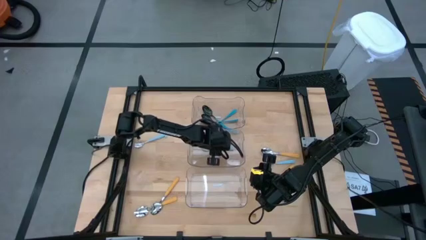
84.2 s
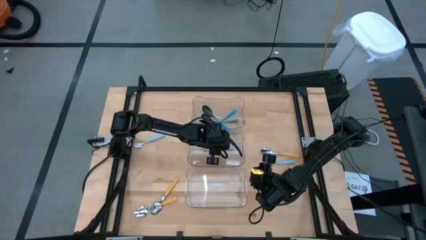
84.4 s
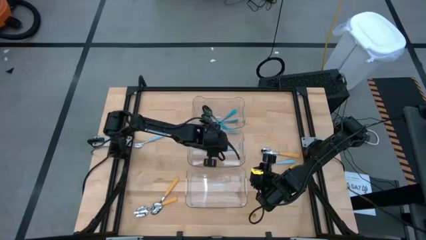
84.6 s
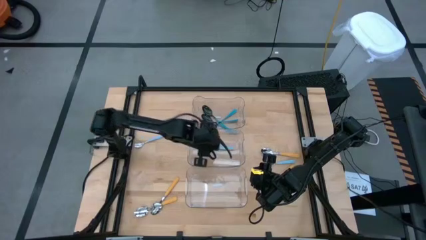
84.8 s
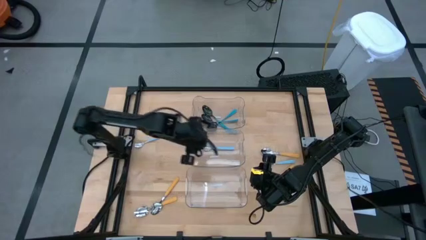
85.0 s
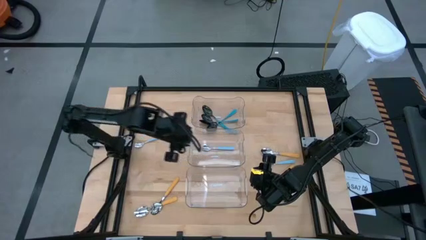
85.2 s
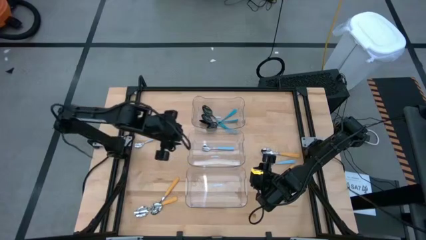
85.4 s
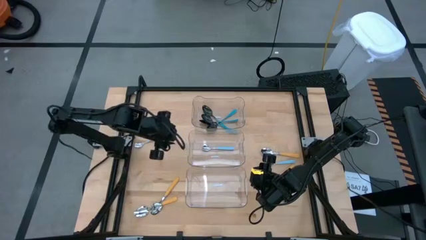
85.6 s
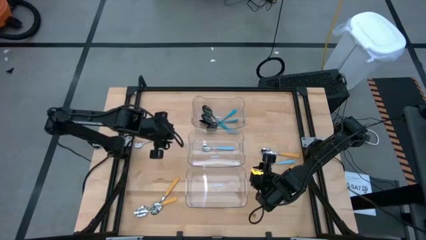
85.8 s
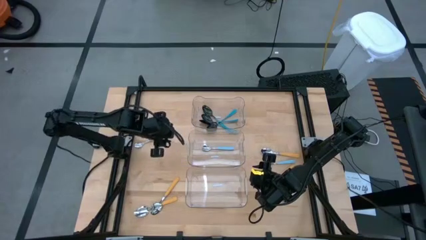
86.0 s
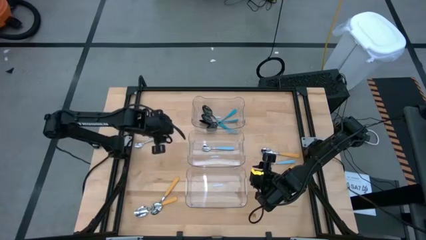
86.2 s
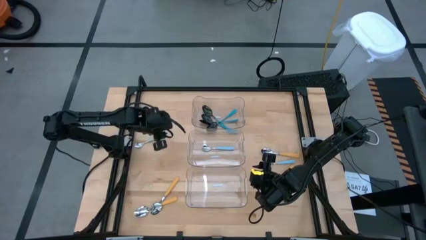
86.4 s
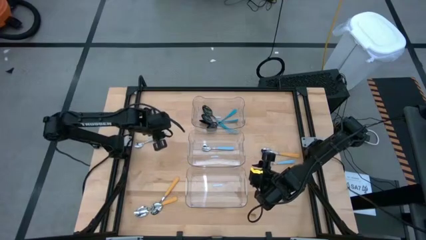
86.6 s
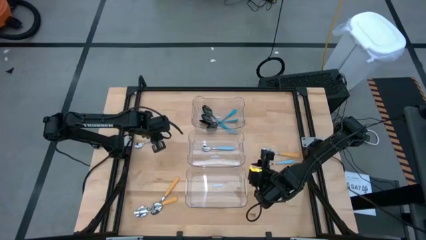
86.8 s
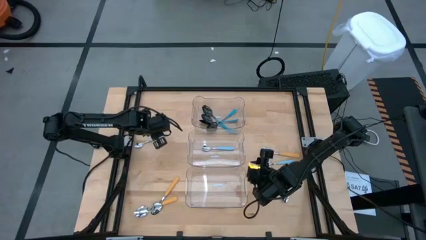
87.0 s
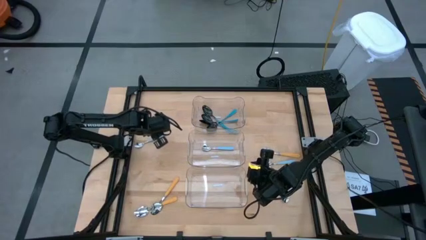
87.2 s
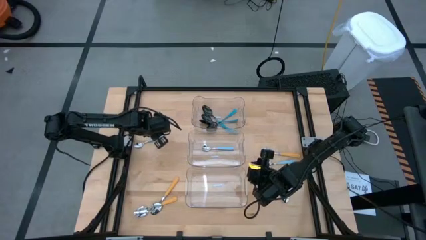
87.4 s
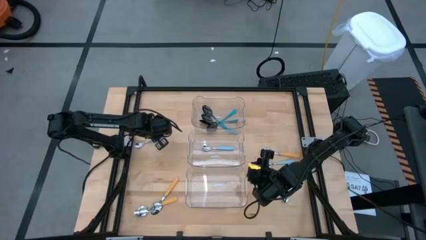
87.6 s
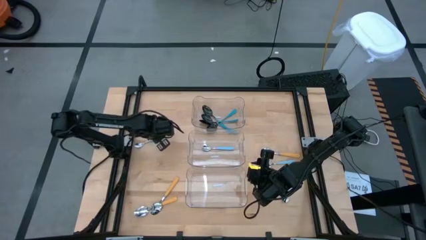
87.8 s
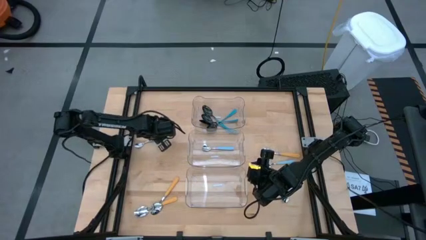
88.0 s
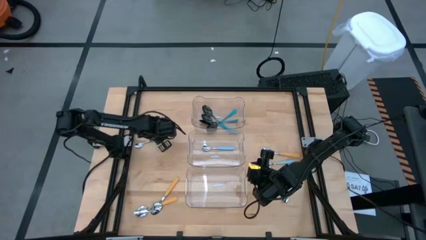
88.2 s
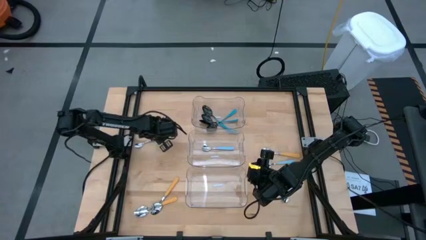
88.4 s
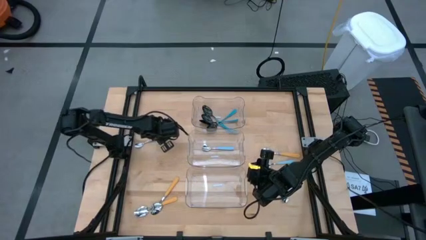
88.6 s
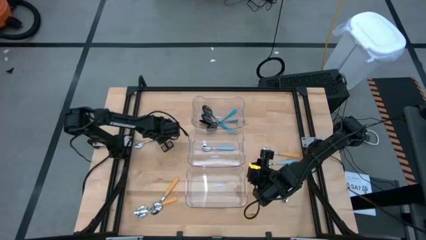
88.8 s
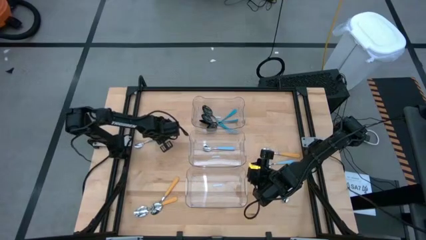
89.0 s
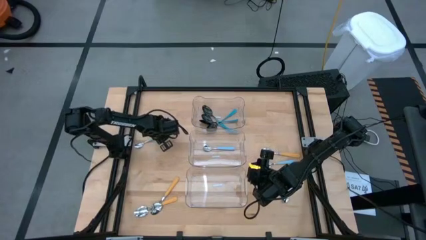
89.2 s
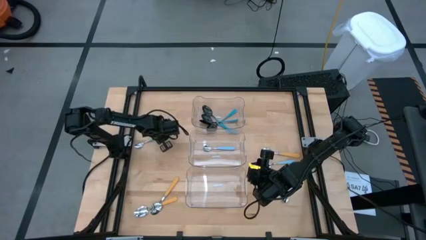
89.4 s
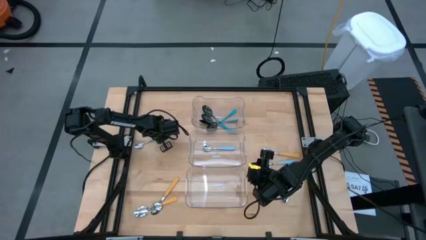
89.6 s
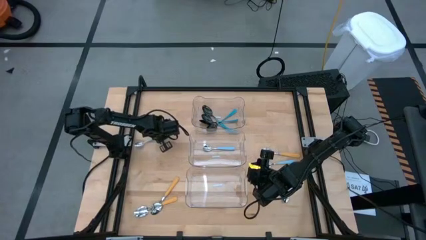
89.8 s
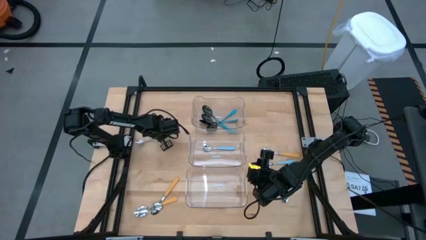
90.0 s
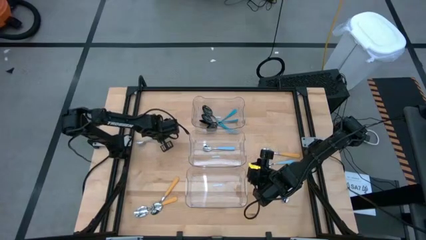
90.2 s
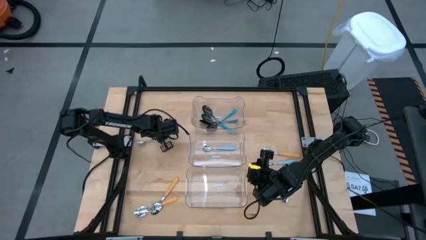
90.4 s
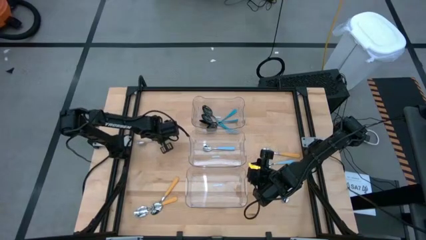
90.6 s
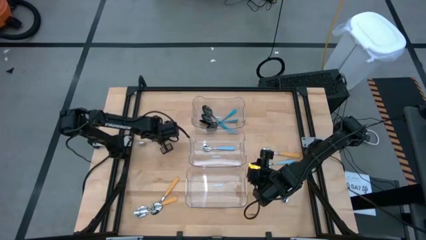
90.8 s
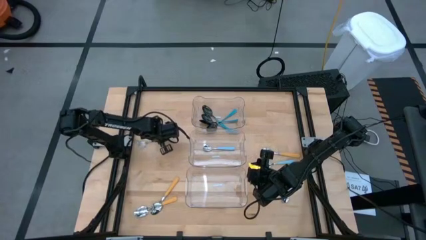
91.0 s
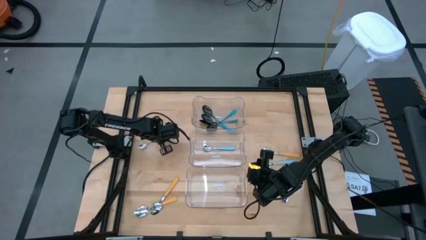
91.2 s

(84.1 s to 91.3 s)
Task: Sort silverware by color (type)
Put the light blue spoon into the middle transparent bin

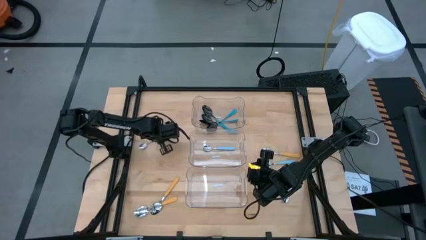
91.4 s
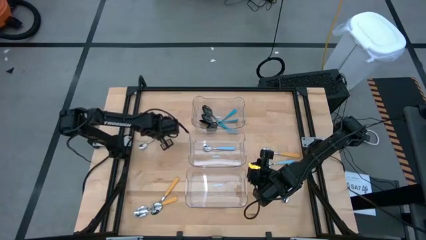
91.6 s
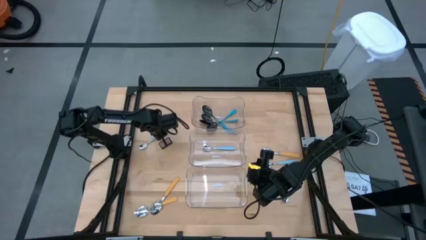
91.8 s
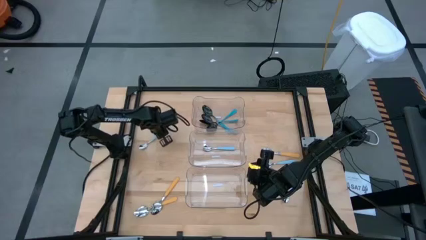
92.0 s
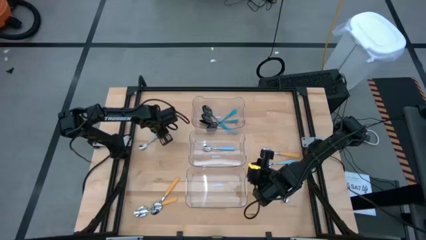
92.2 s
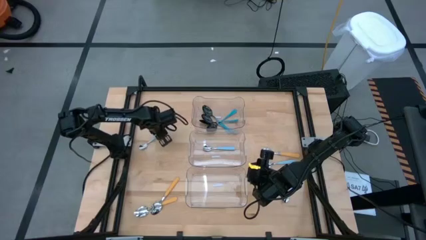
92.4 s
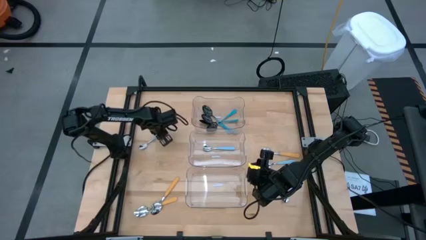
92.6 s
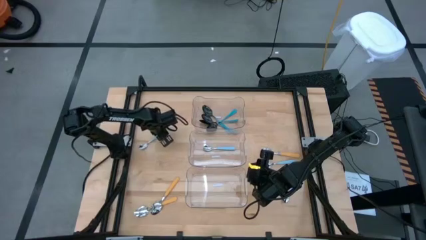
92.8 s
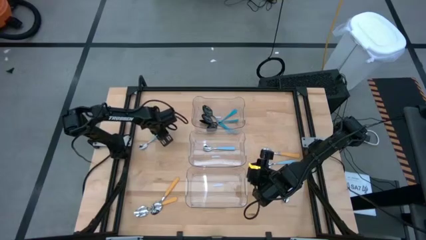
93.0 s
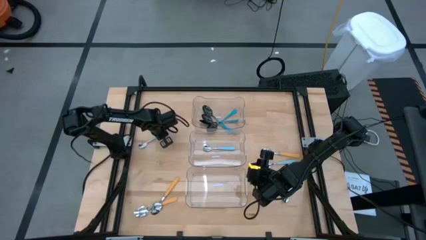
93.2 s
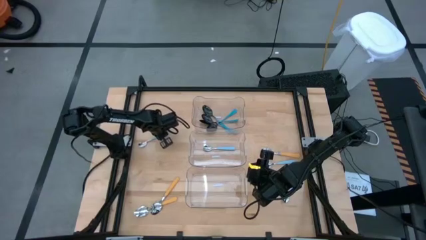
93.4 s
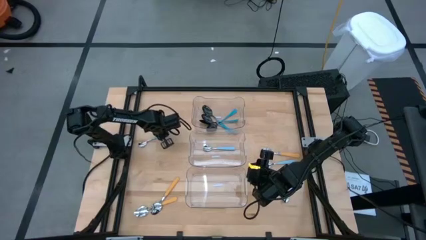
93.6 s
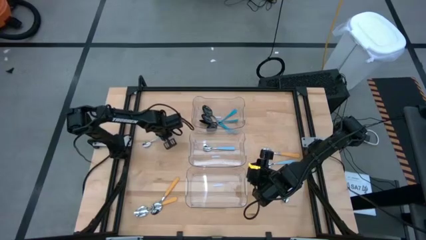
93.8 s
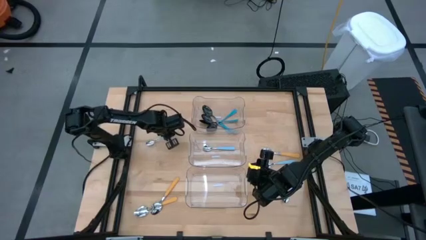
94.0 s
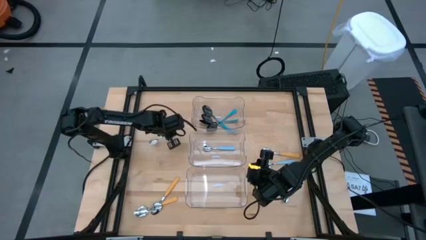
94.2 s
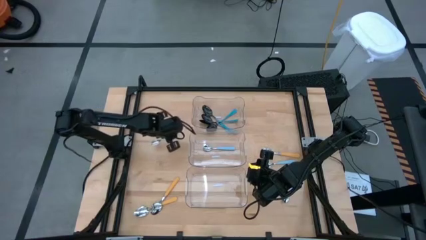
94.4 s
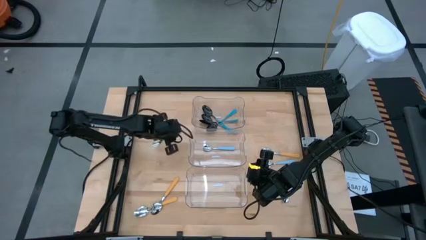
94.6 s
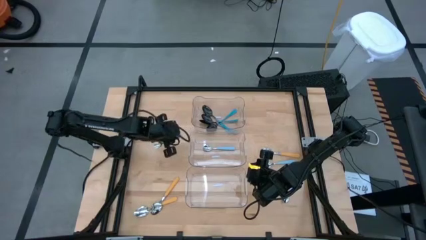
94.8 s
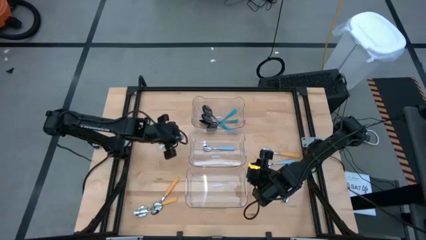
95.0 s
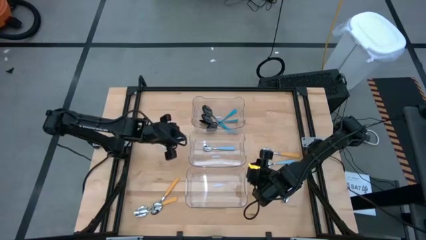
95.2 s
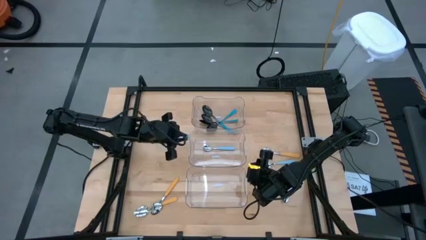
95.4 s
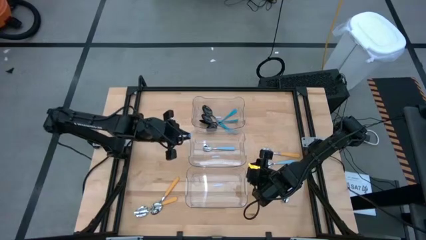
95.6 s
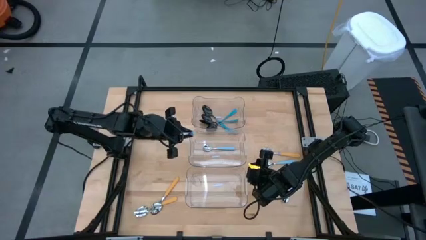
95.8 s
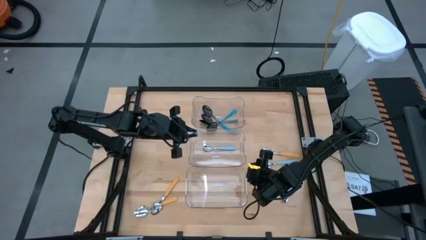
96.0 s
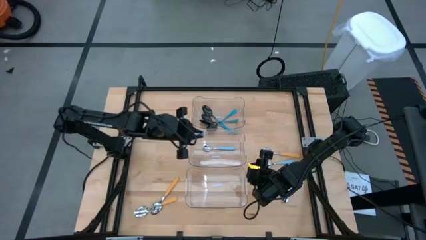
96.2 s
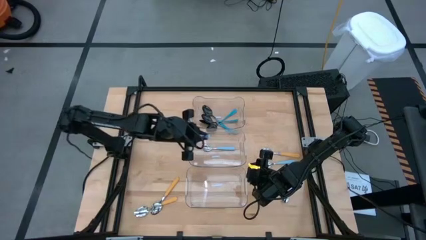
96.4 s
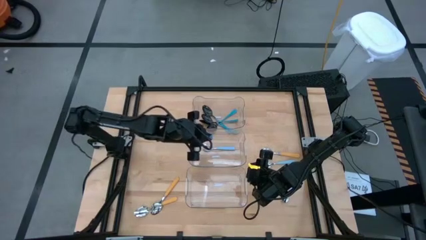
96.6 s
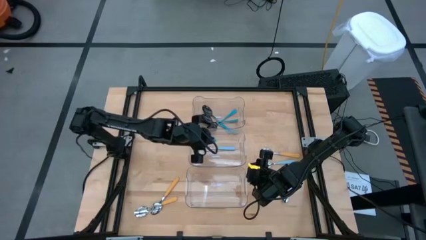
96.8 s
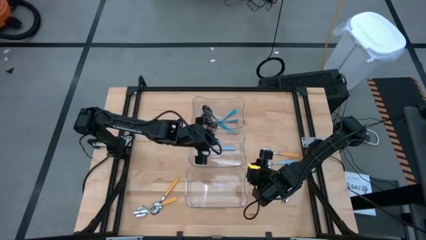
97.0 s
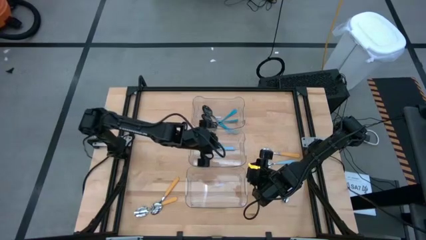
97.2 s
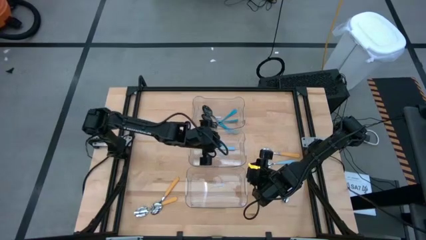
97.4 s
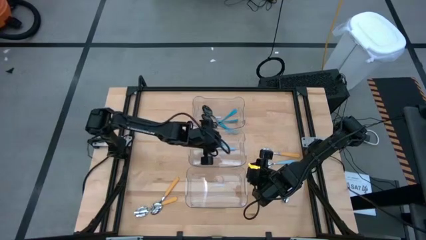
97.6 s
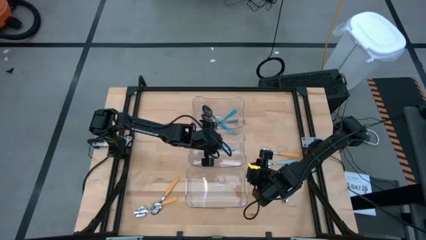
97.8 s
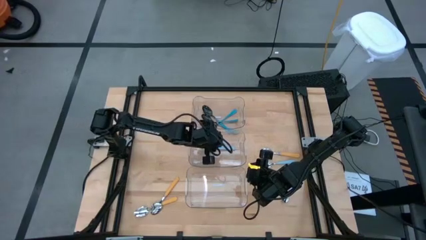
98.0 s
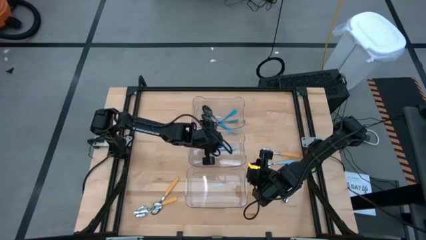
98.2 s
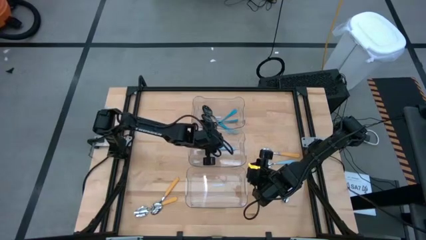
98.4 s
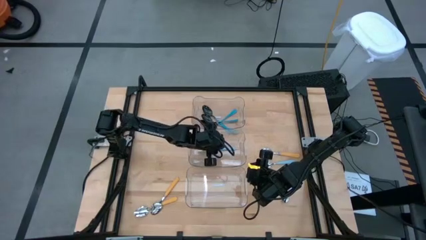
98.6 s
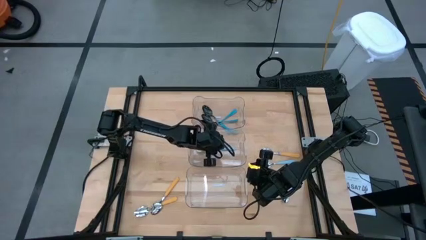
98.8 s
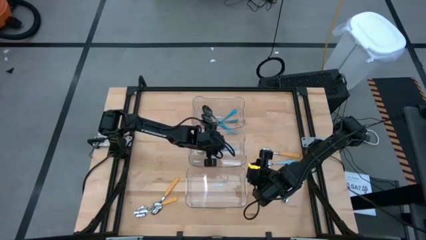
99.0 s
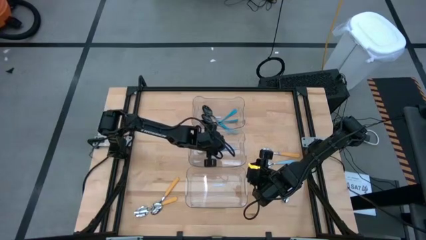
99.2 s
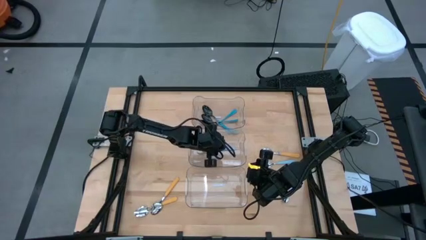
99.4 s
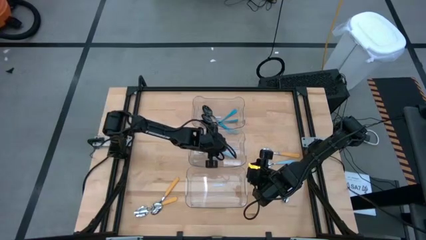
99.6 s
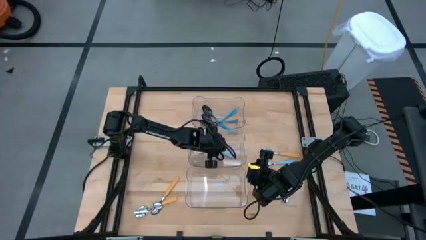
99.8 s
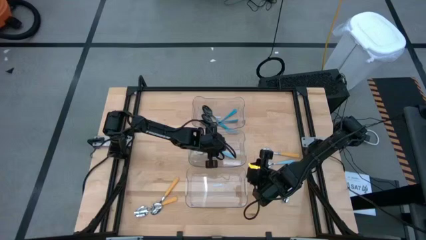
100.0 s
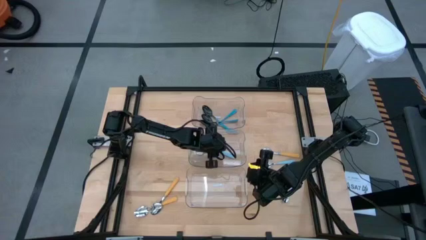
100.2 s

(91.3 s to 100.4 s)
Put the light blue spoon into the middle transparent bin

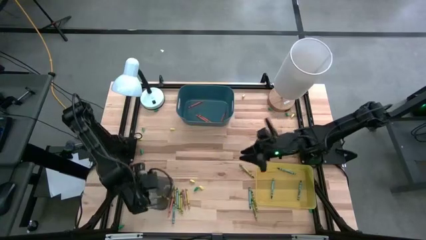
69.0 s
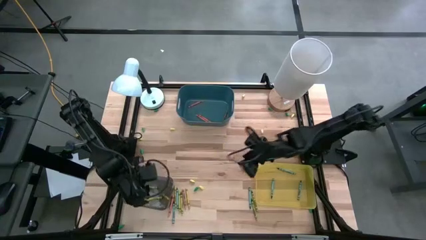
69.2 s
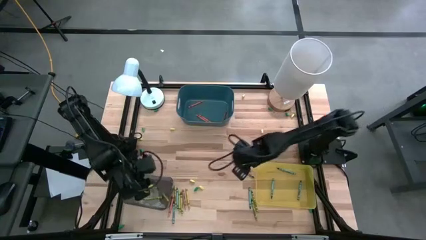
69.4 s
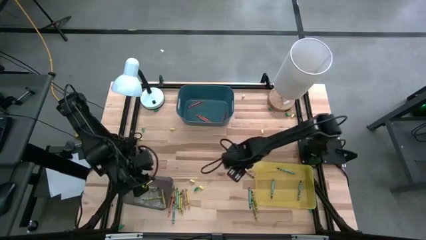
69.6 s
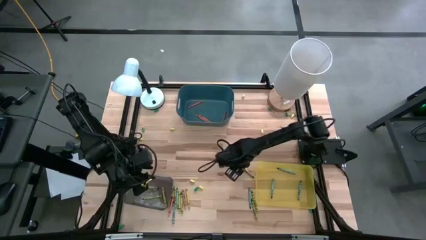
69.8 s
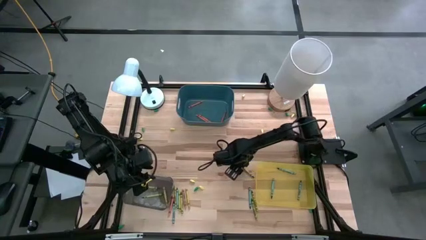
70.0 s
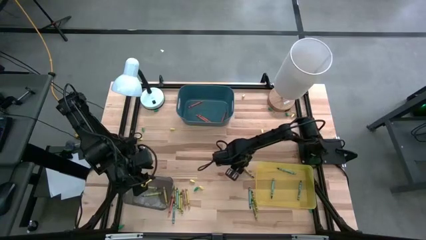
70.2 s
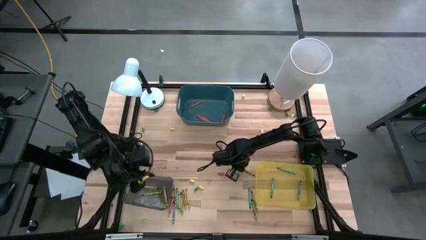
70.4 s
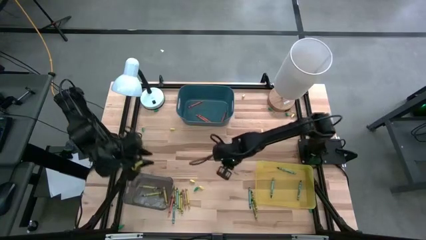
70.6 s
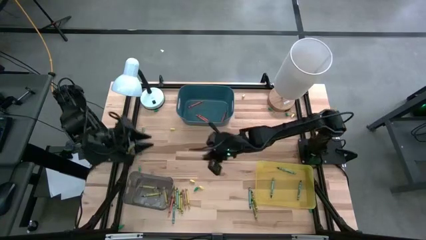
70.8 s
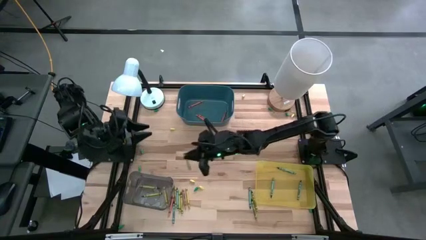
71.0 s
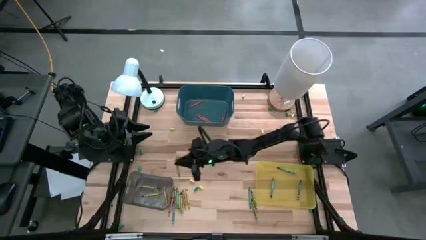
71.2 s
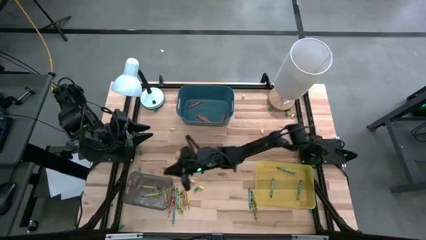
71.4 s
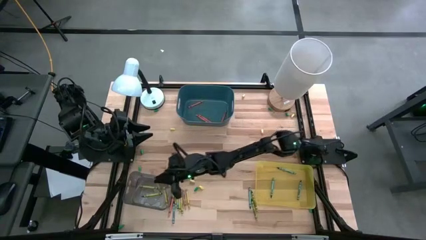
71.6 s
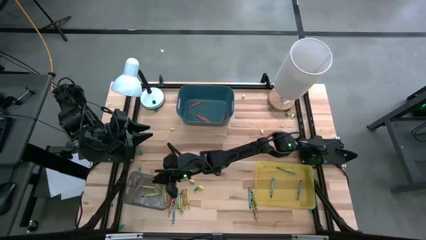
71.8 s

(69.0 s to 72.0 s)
Task: Sort crayons
Put the yellow crayon into the gray bin
